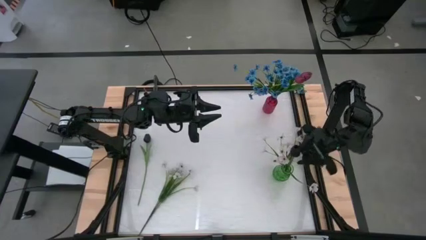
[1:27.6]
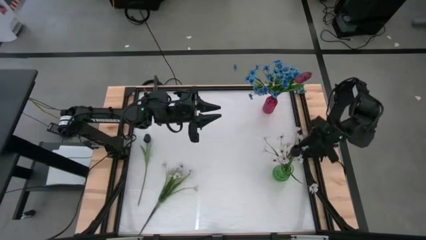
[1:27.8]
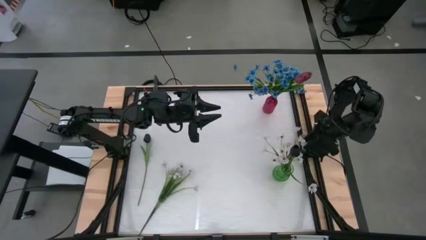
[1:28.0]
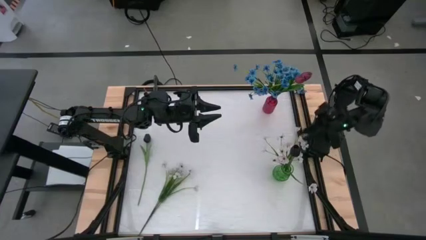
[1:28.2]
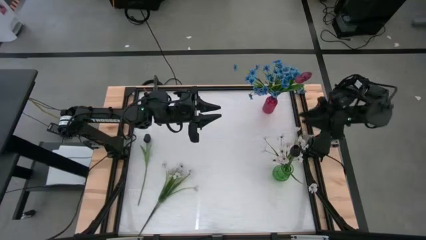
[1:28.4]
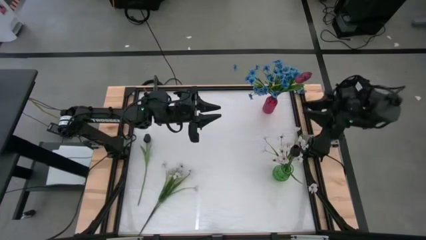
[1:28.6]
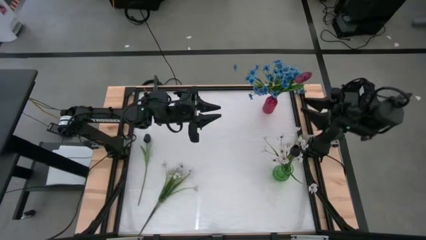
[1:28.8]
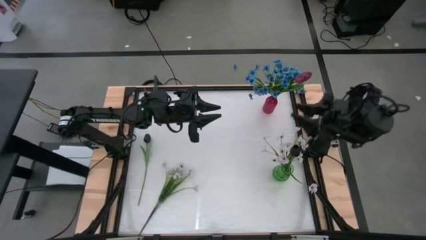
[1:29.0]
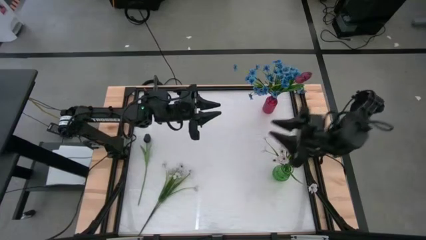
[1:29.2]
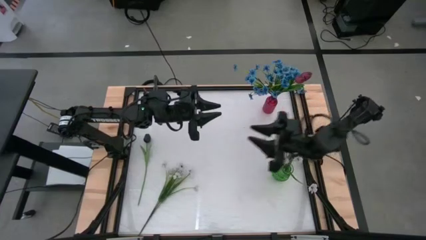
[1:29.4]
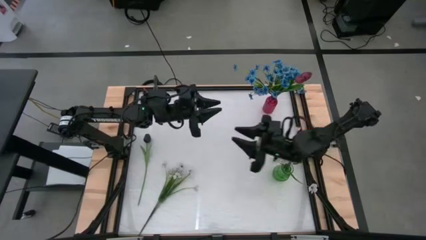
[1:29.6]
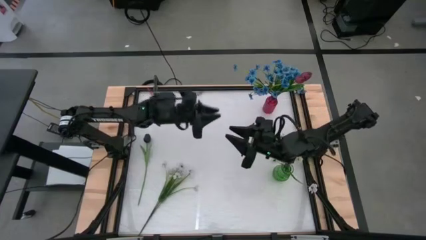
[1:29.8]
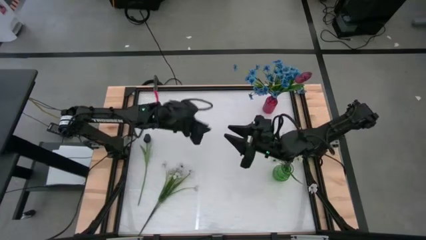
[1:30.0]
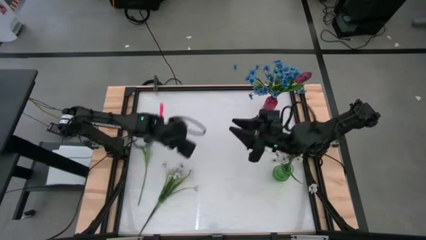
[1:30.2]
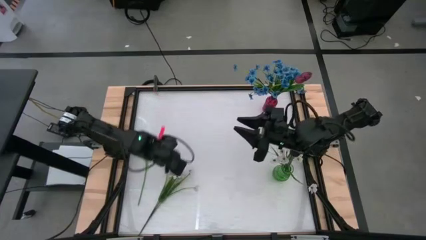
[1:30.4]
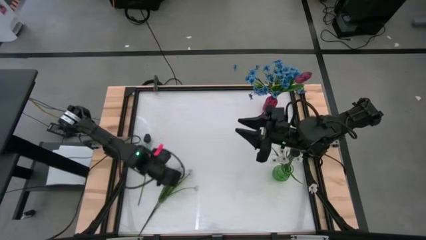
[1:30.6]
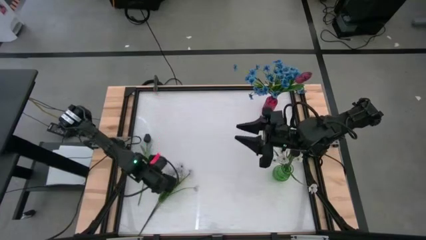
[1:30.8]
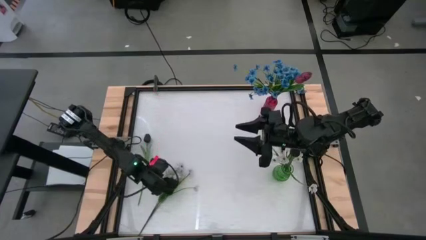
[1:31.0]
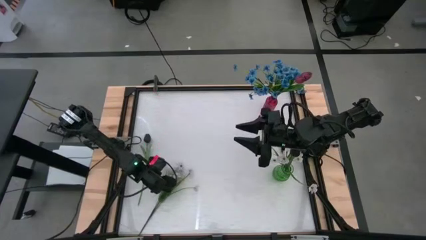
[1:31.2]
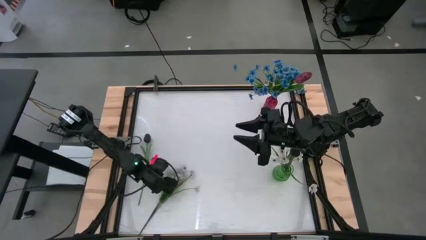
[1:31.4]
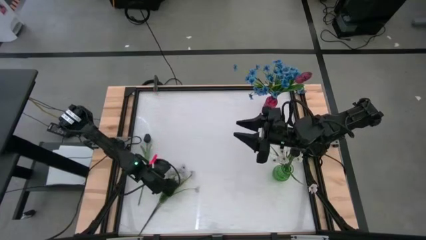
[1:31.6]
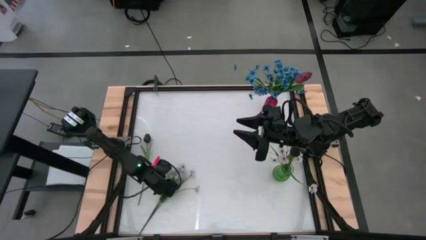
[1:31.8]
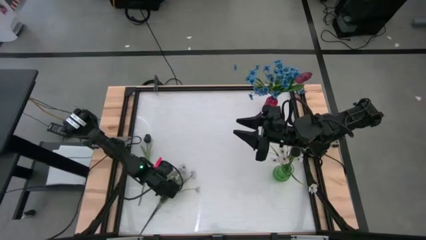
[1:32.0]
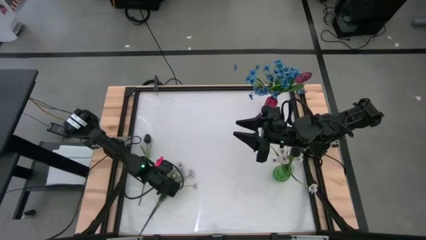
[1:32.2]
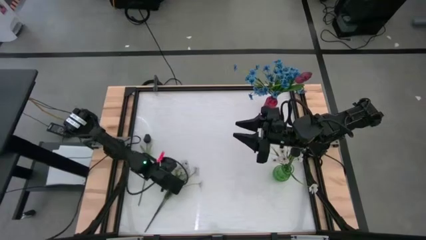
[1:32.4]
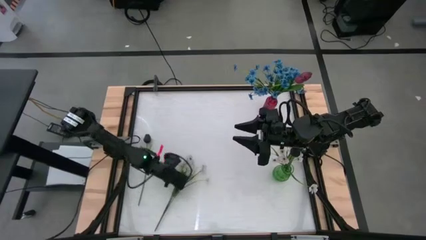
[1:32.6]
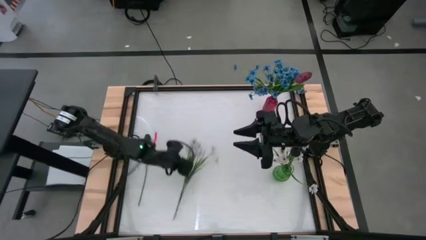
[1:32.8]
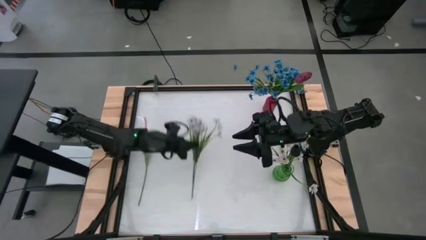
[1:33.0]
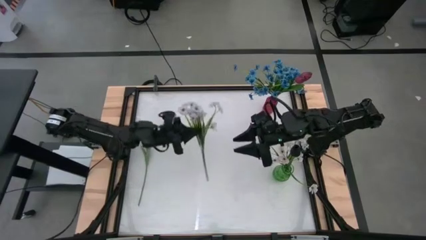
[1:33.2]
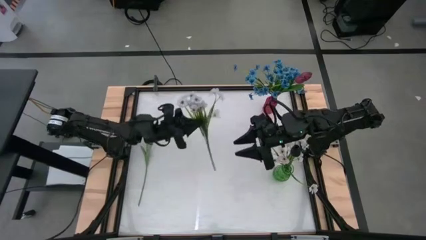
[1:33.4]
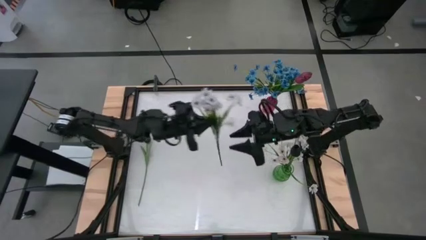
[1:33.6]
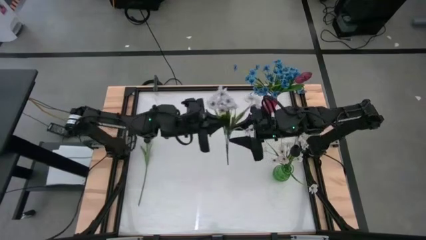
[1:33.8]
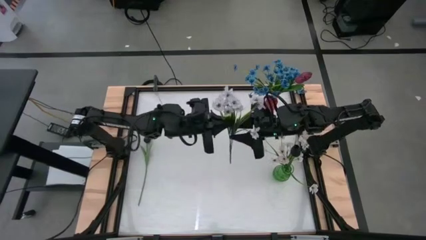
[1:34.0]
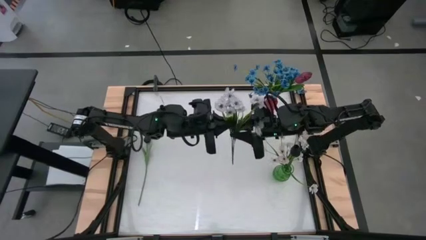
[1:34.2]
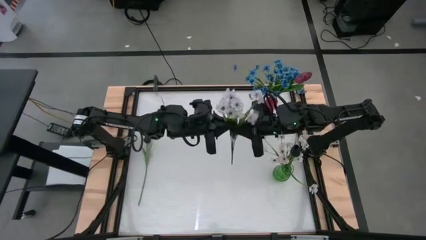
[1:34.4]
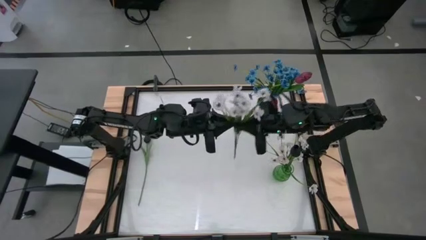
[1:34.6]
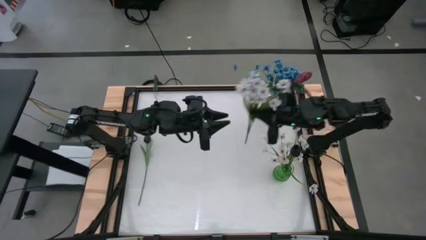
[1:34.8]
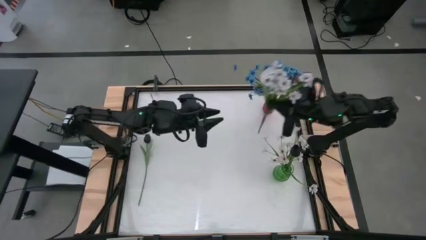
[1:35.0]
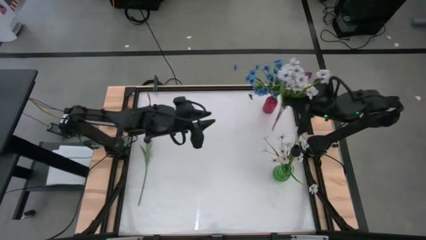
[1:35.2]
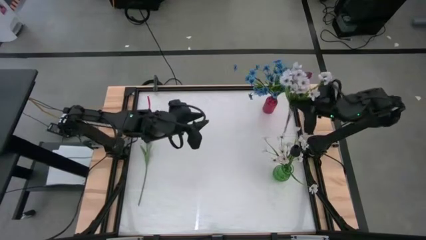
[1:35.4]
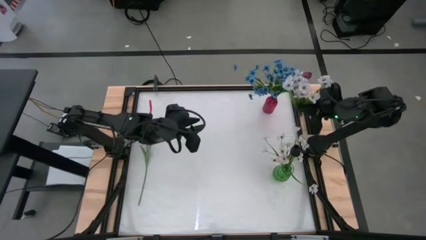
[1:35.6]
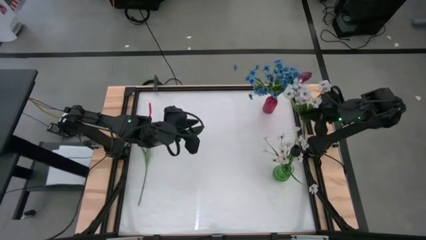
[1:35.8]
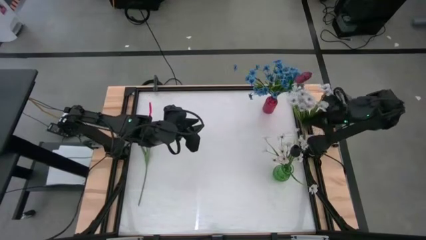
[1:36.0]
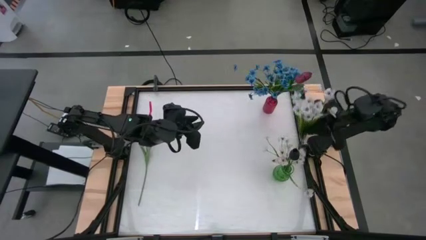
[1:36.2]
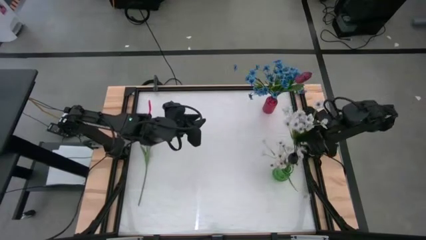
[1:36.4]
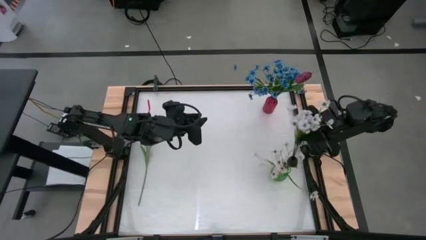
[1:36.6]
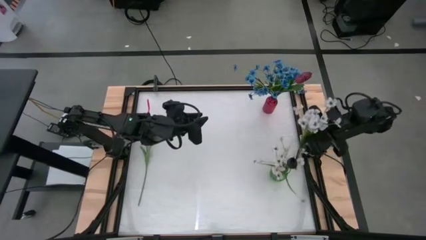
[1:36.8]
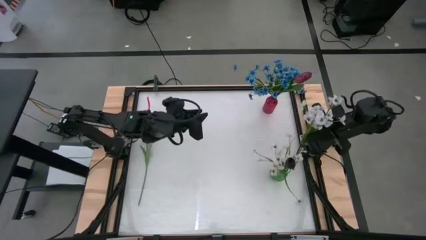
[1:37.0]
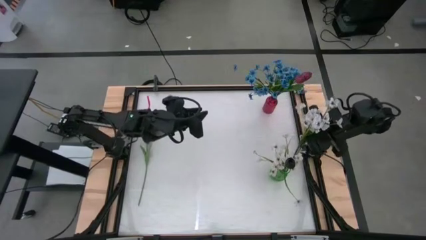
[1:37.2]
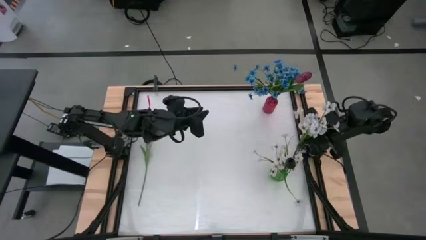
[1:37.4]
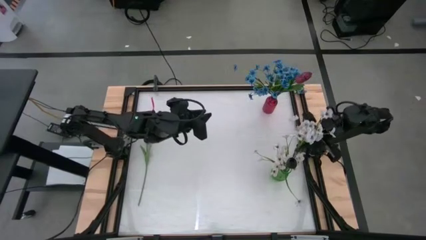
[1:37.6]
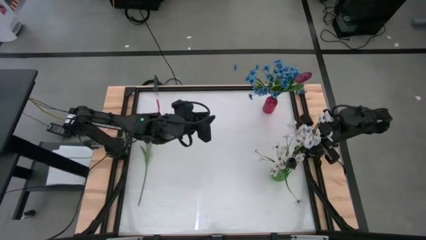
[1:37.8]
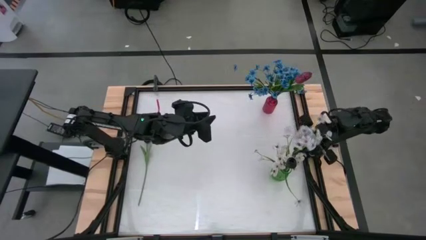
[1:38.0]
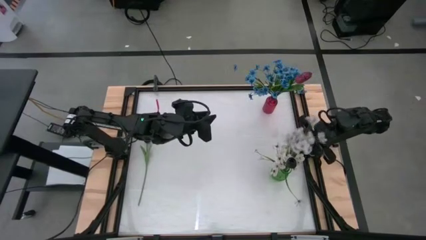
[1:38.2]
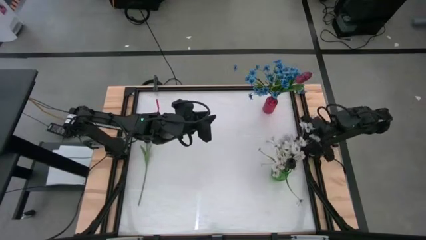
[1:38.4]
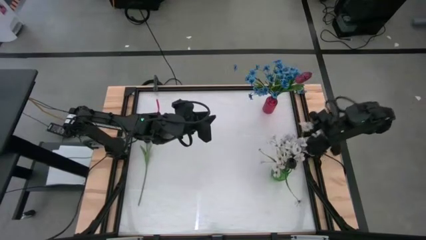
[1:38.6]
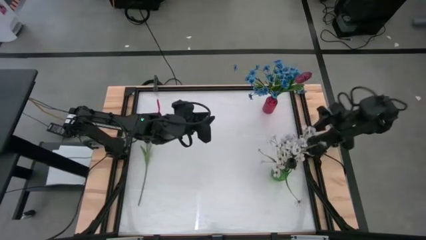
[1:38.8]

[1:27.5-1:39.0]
Task: Sort flowers into vase by color
Put the white flowers into the green vase

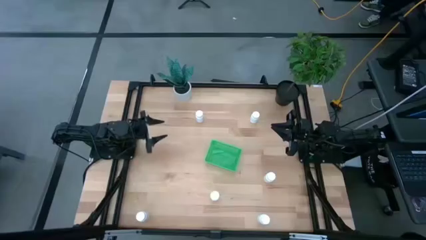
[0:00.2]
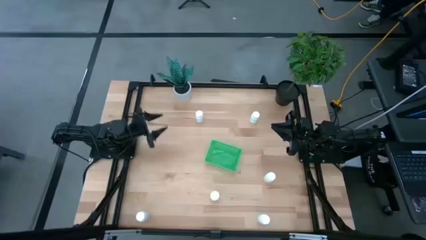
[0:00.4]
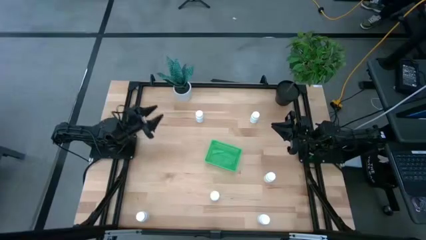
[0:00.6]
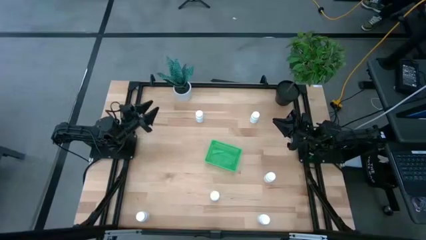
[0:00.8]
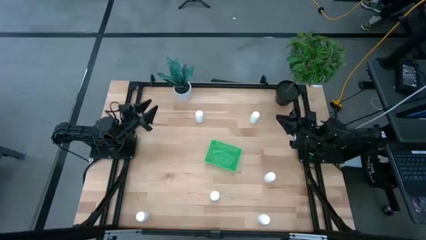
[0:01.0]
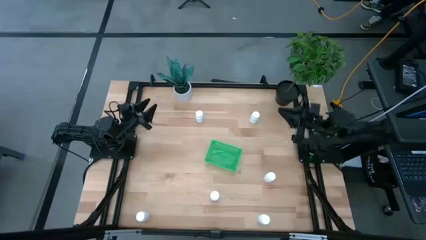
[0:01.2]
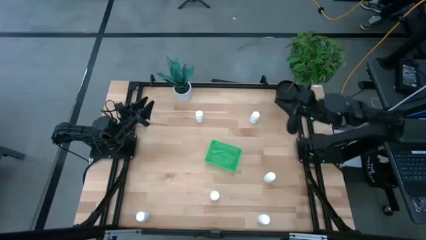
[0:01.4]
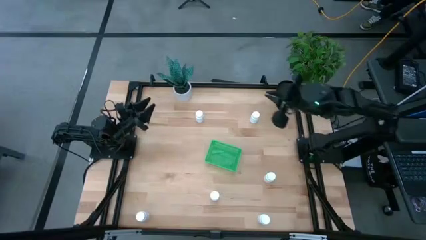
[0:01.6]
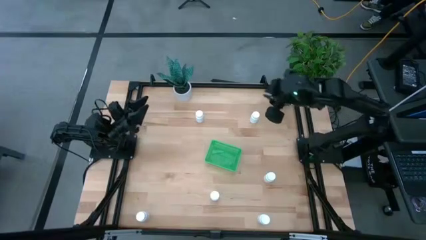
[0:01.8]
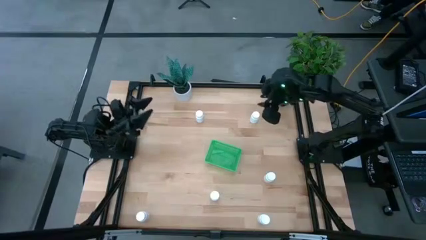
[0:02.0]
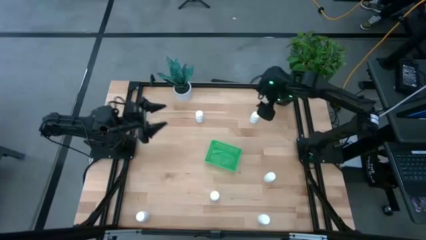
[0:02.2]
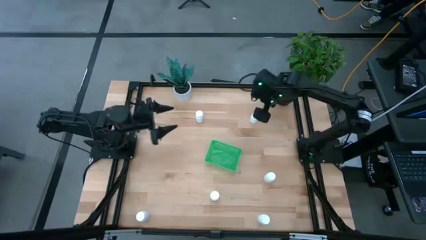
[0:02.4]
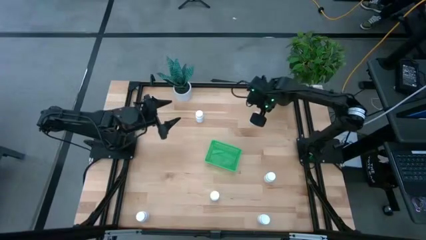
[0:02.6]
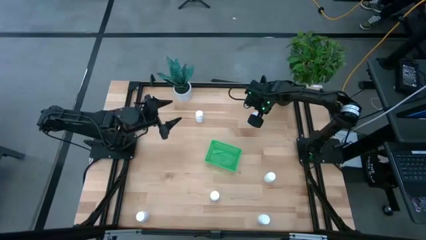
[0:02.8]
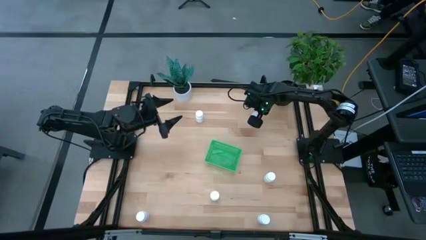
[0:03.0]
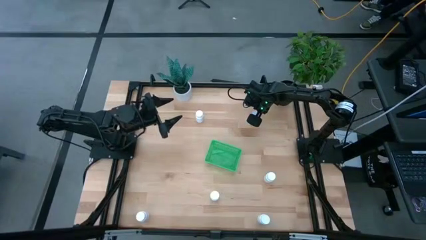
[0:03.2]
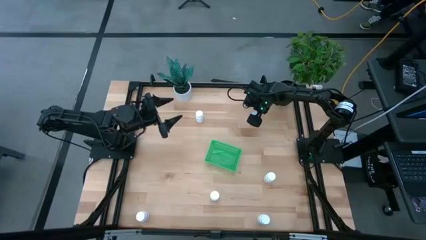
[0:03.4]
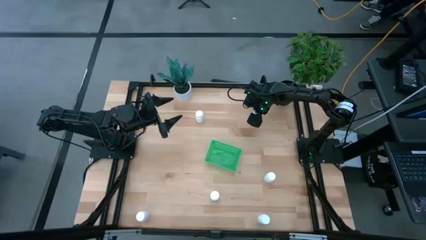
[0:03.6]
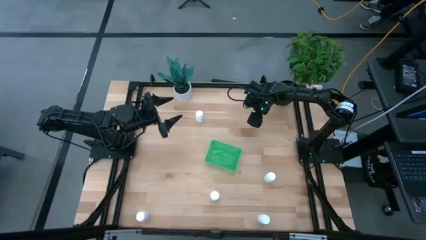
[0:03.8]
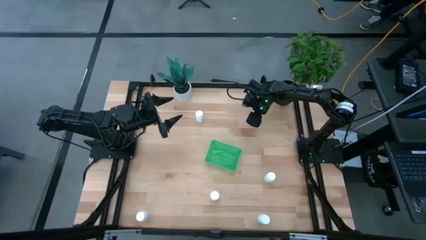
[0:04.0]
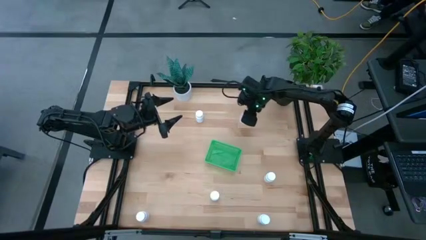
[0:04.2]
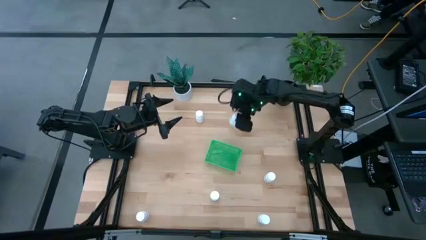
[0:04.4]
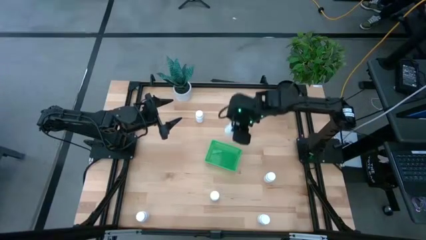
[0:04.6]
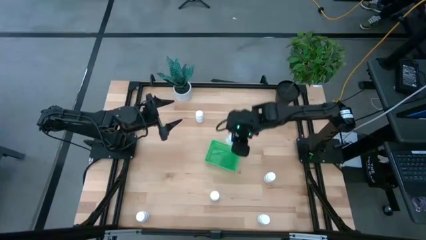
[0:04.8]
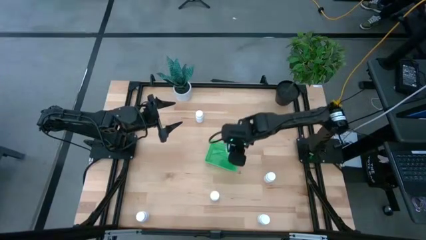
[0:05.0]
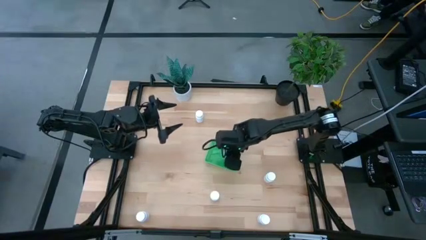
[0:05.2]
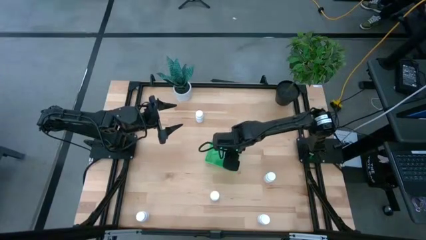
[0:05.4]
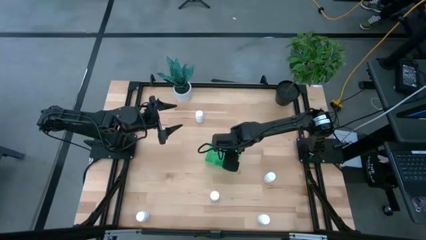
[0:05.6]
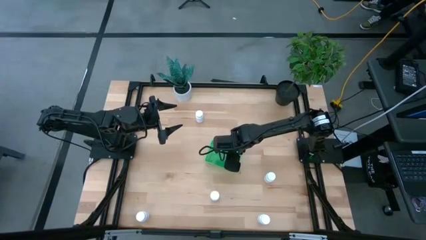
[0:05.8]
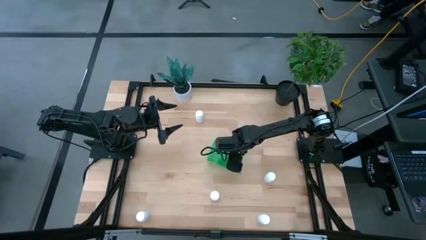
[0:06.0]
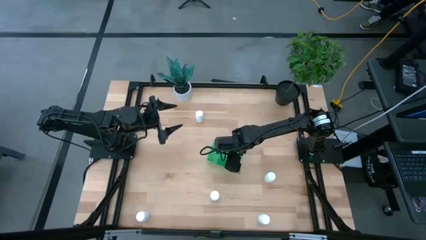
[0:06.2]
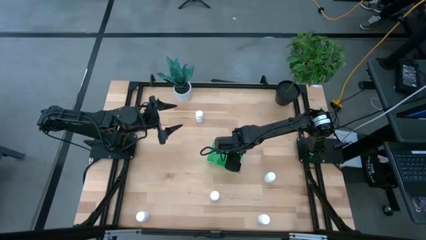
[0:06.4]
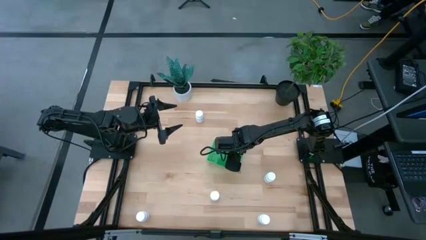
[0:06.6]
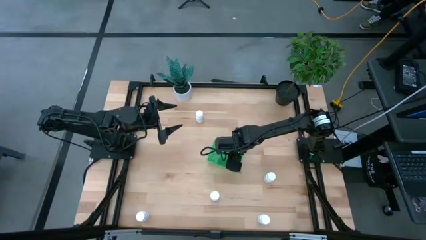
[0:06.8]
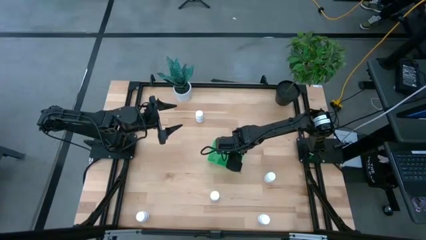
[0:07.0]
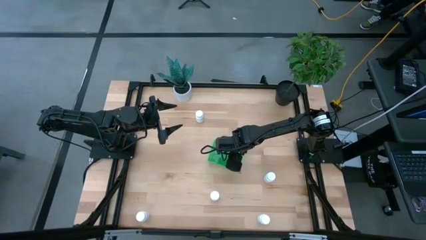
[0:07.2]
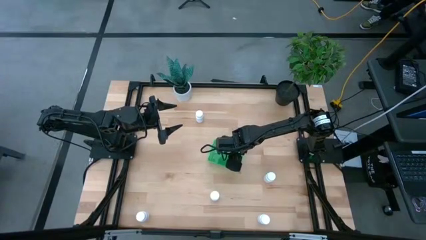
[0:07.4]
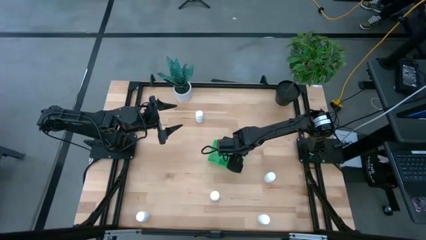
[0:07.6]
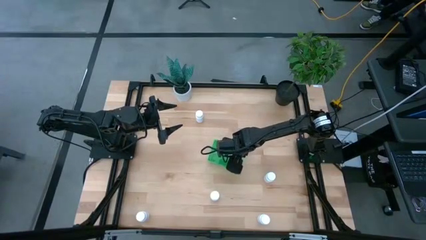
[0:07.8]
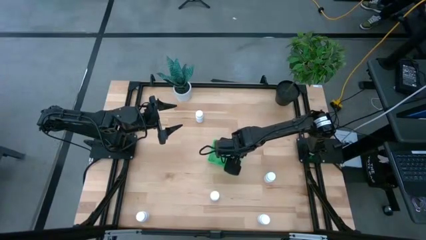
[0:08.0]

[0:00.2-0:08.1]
Task: Pick and place pill bottles into a basket
Put the white pill bottle into the green bin
